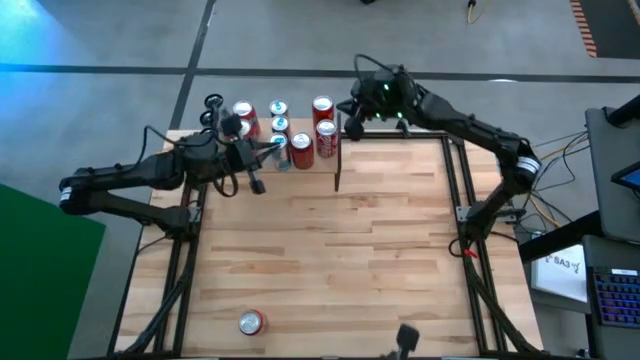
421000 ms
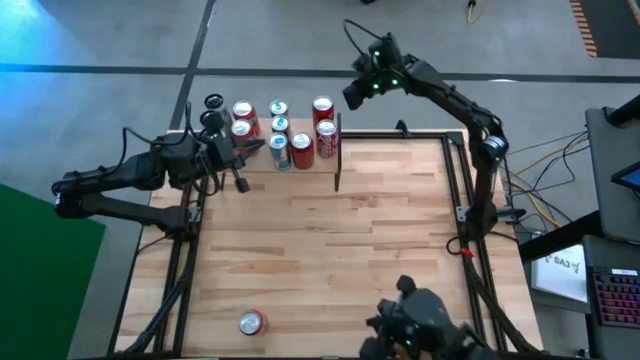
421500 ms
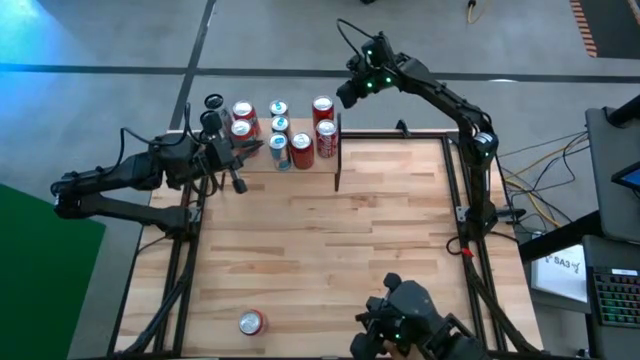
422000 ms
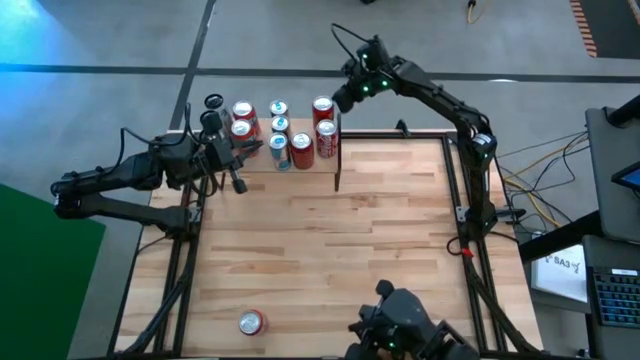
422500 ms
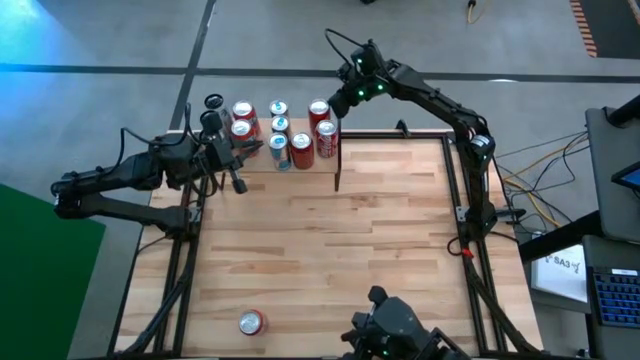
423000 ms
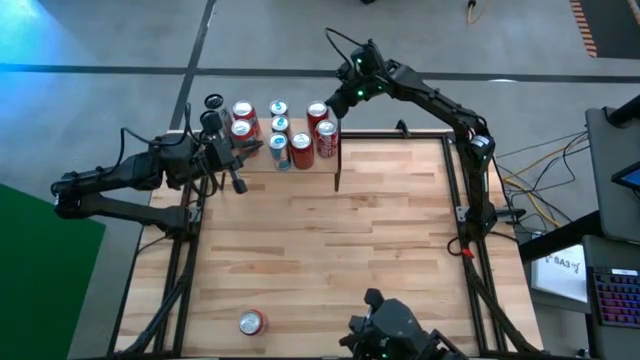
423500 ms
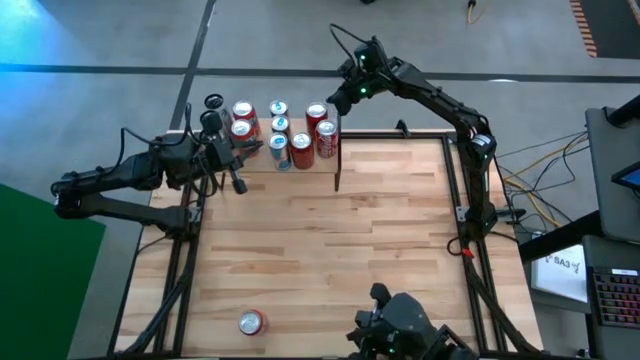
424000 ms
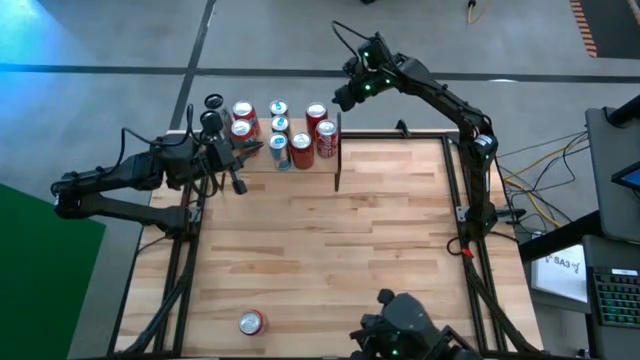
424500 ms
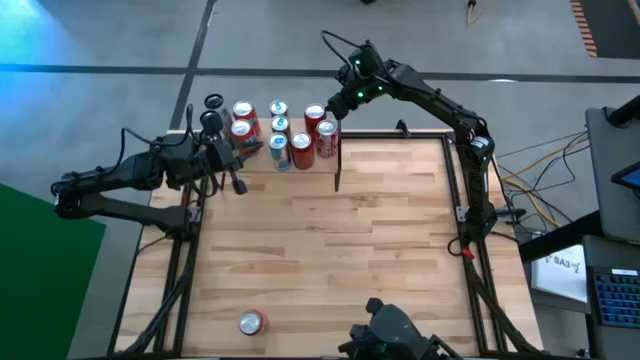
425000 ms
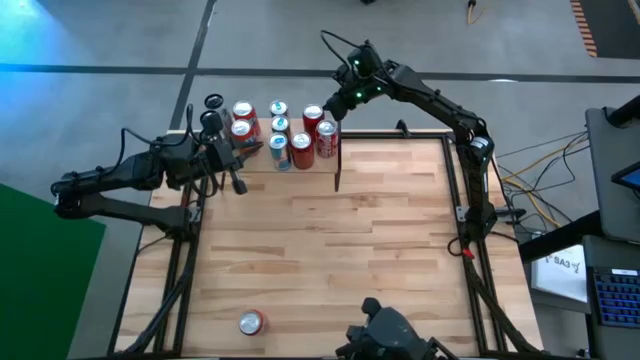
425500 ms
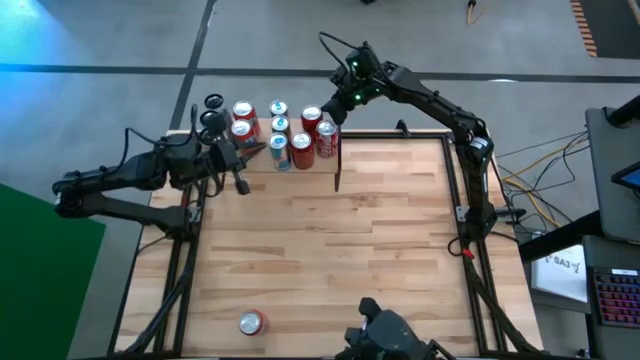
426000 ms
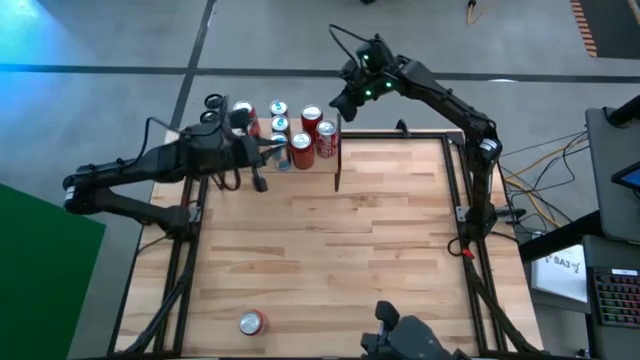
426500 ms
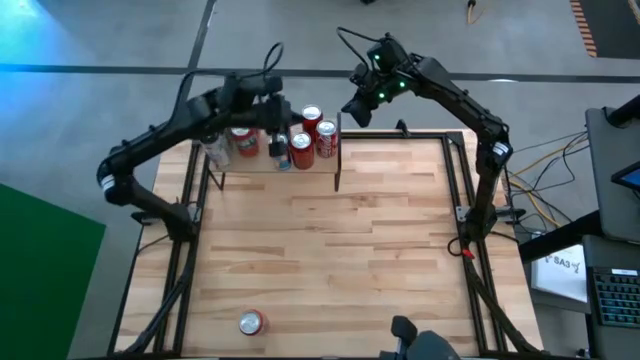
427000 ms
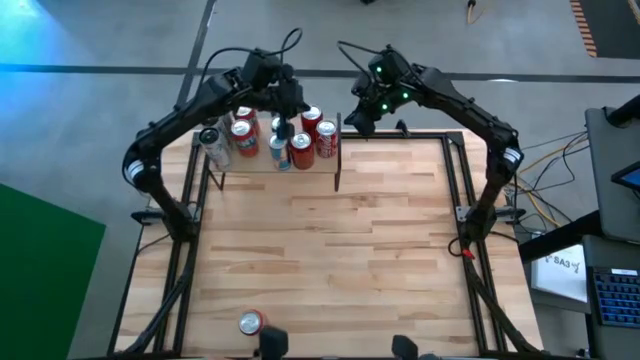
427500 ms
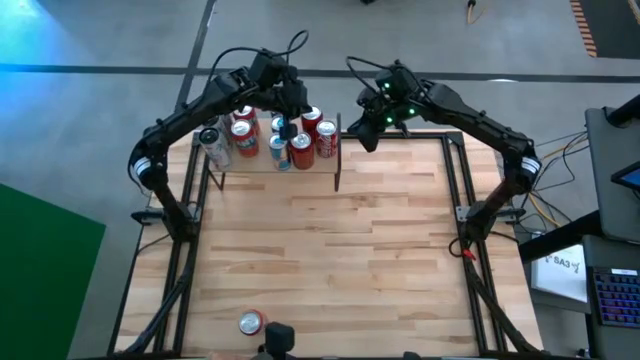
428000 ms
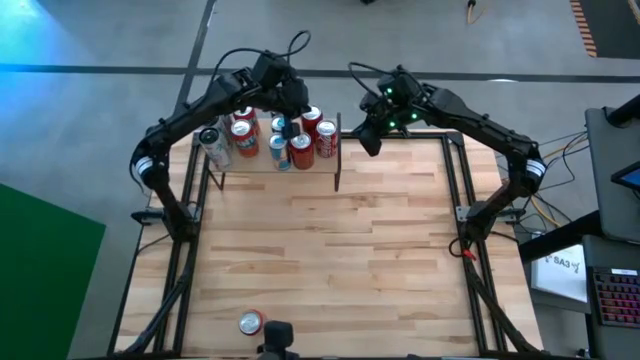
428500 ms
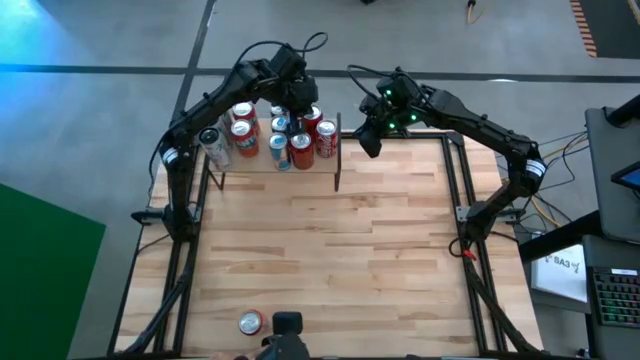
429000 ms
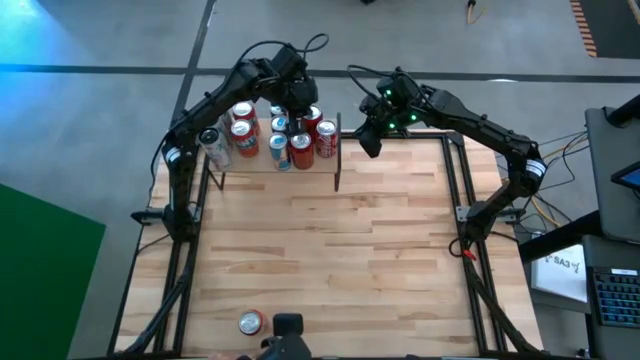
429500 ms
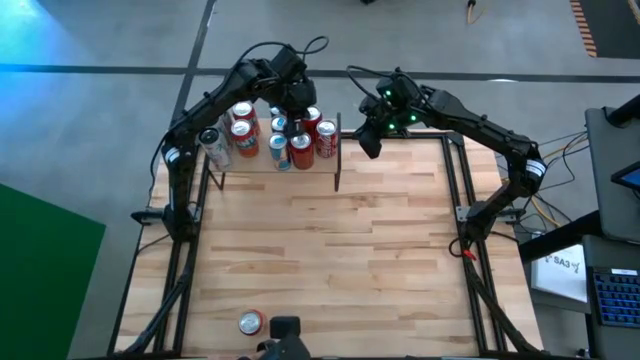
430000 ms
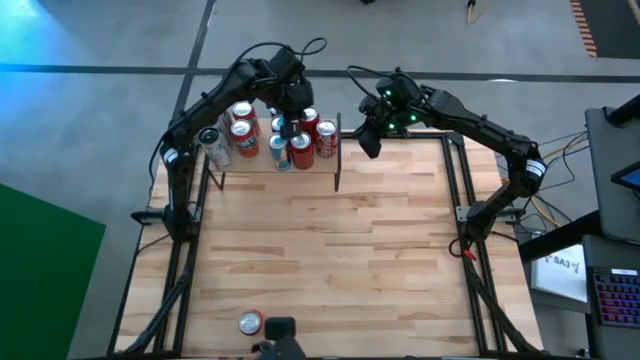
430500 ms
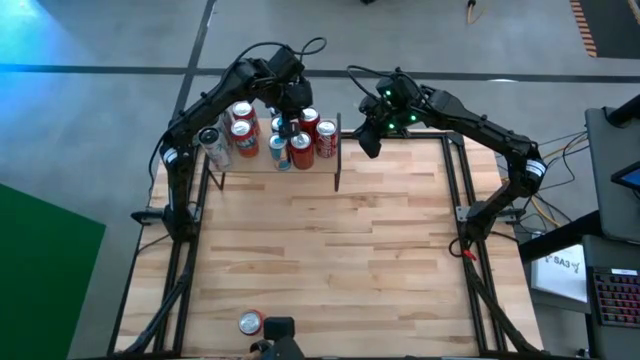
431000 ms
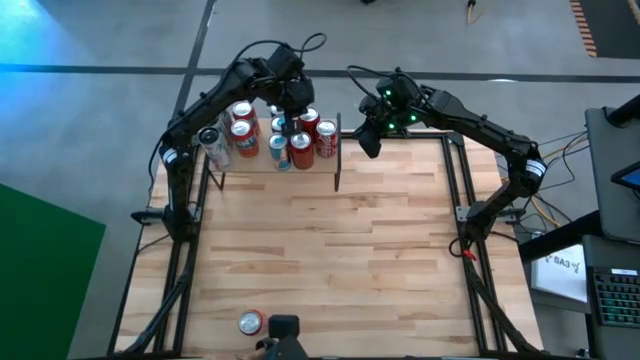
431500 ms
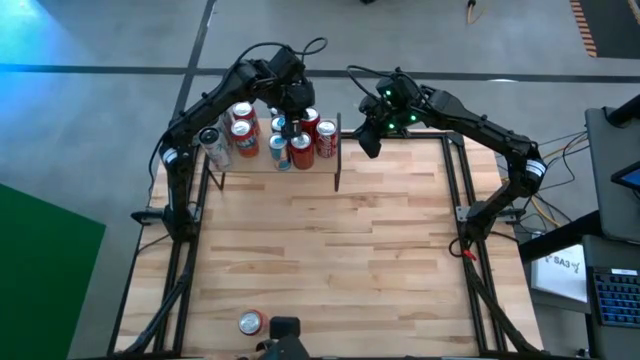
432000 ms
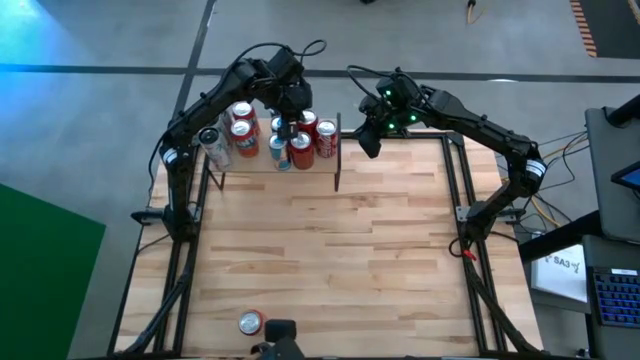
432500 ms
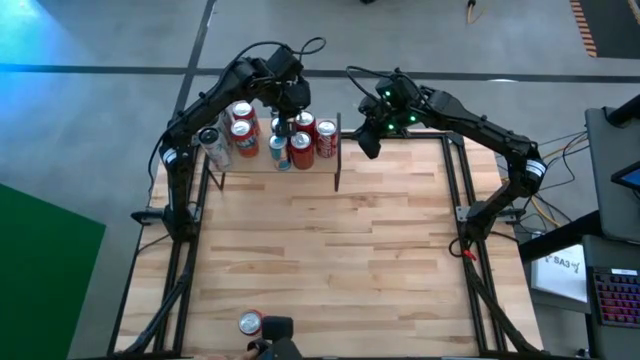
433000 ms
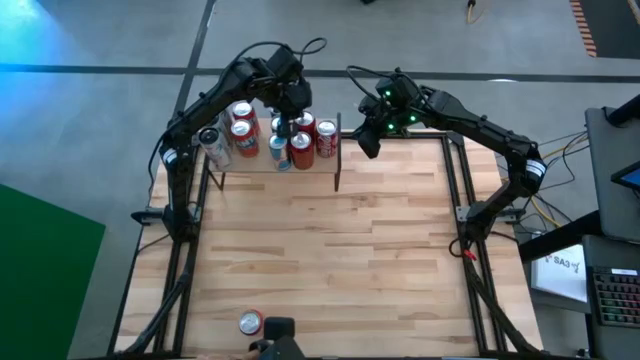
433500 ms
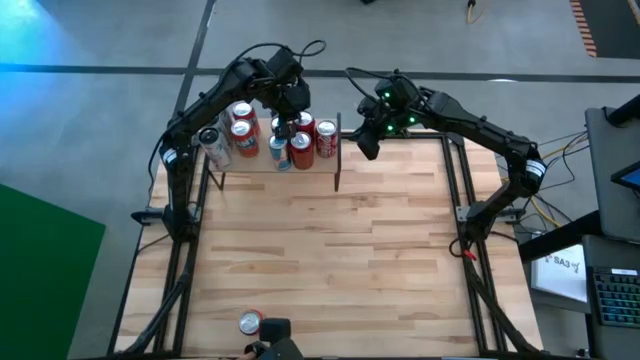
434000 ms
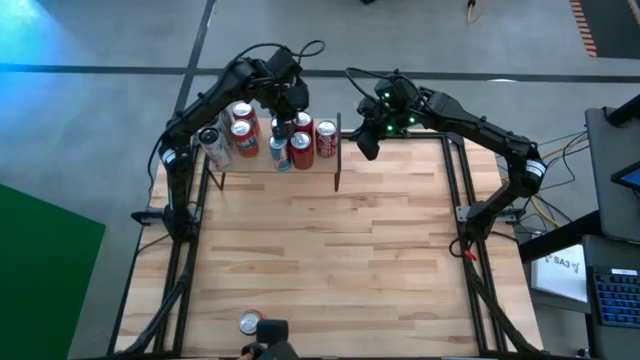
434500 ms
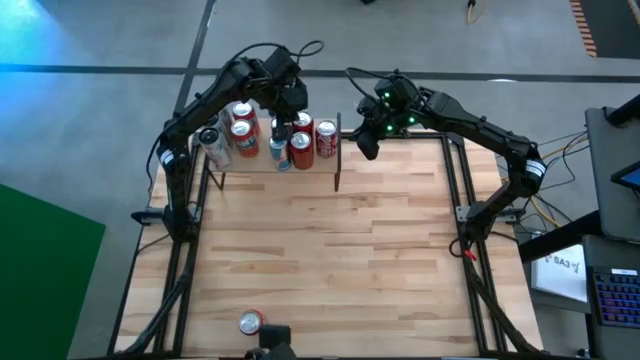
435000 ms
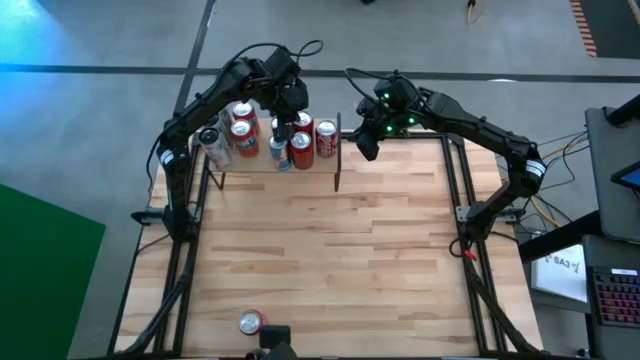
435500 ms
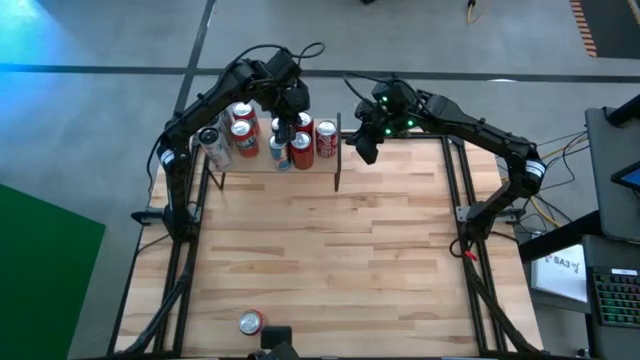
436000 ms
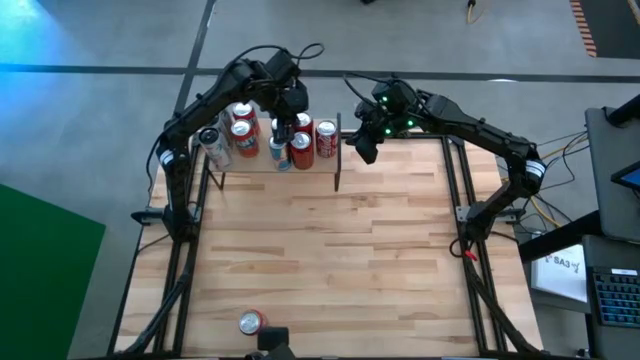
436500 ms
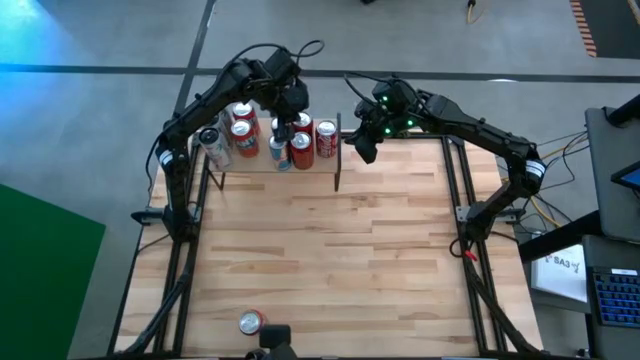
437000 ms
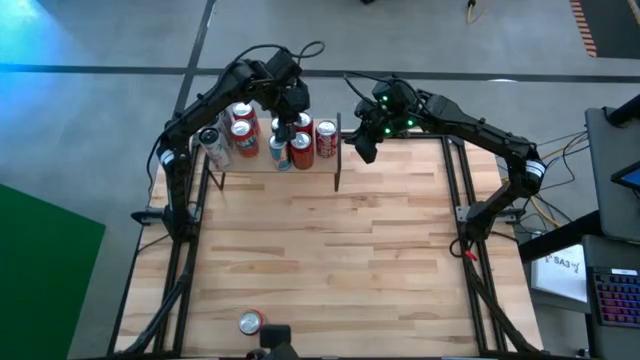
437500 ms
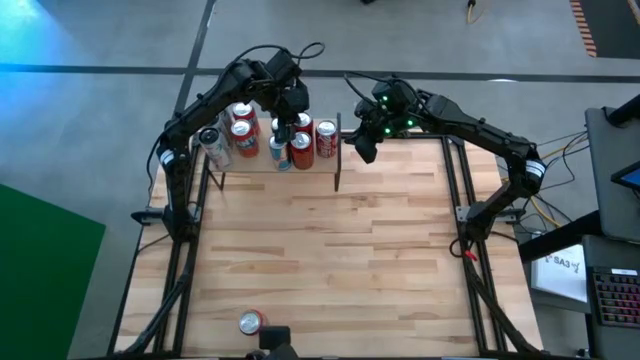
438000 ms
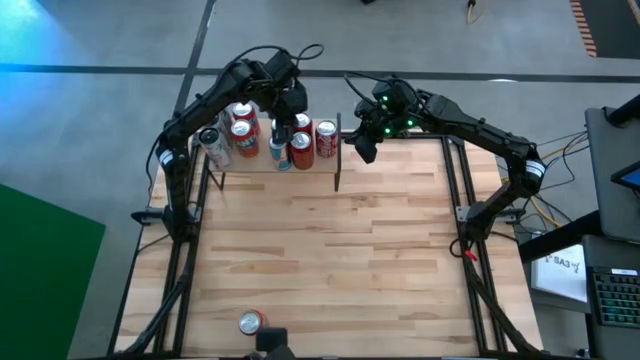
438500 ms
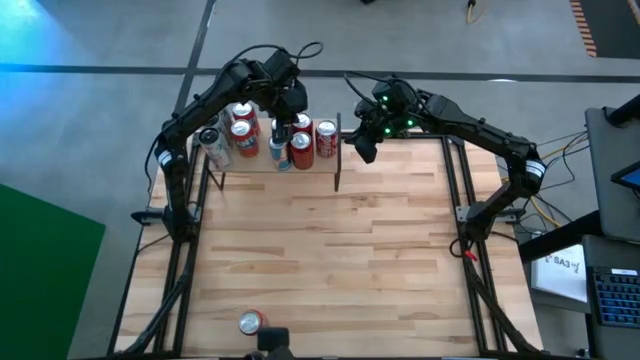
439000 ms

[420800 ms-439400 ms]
Task: Place canned beverage on shelf
Adjust the red black soda can on the shelf

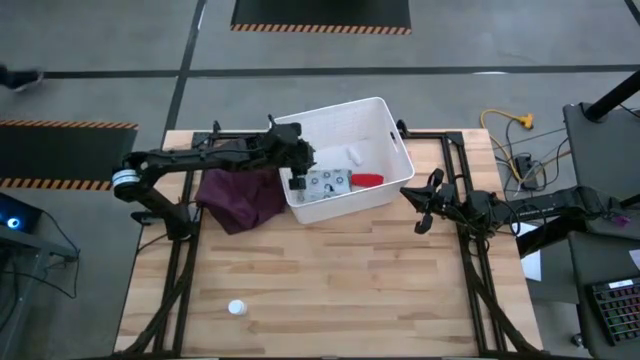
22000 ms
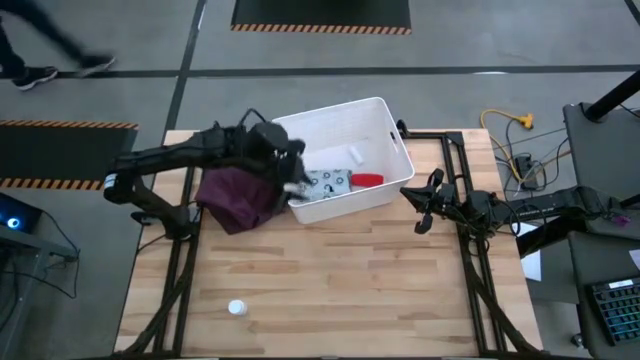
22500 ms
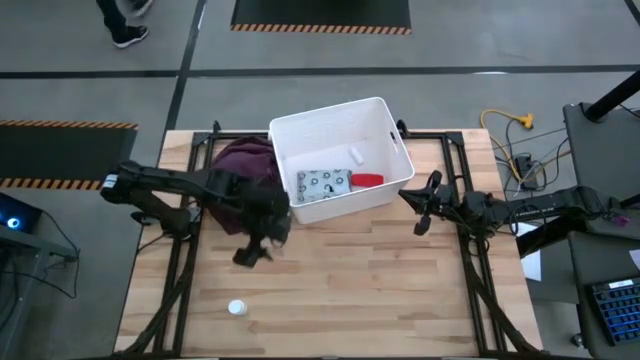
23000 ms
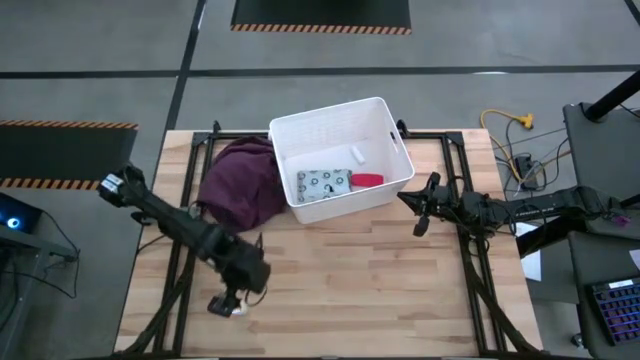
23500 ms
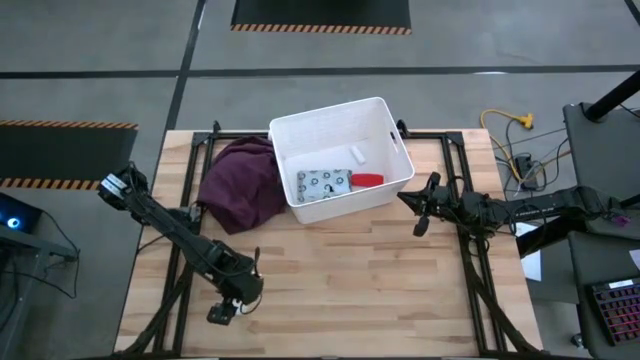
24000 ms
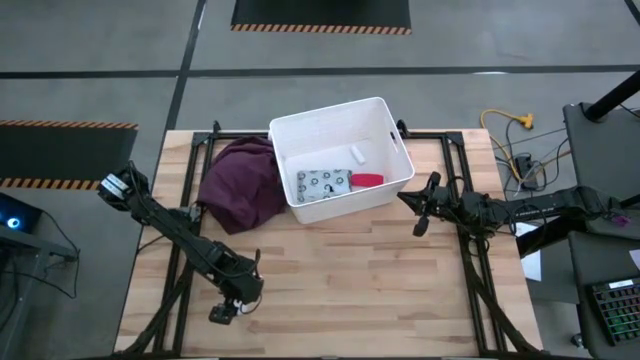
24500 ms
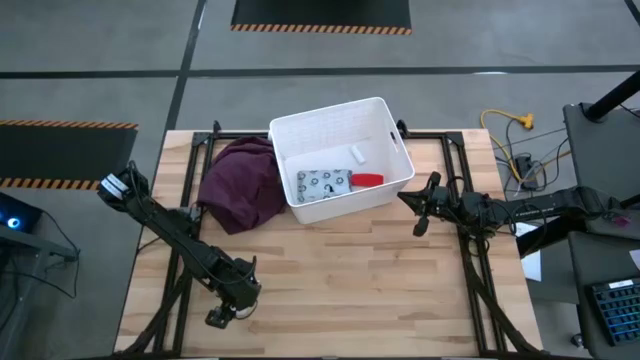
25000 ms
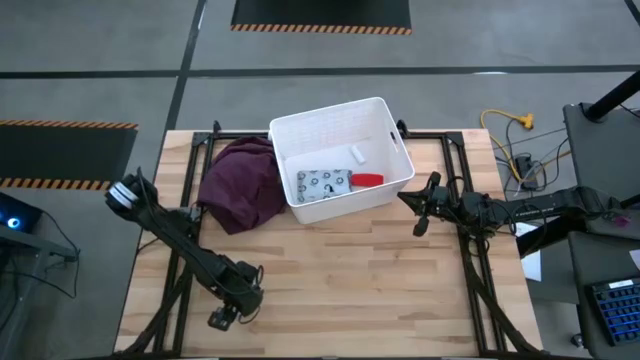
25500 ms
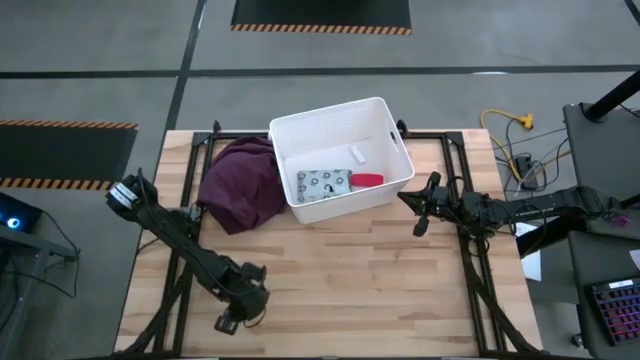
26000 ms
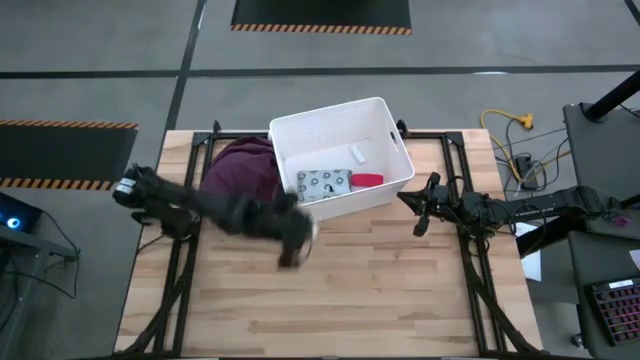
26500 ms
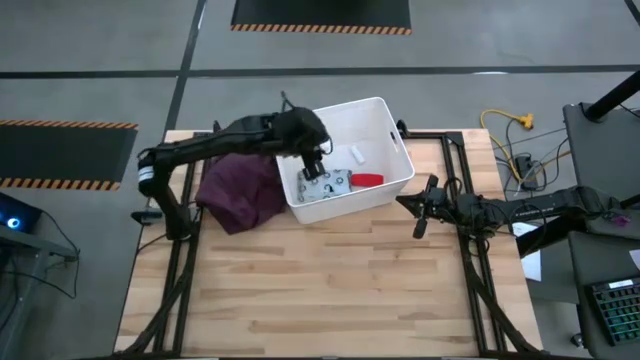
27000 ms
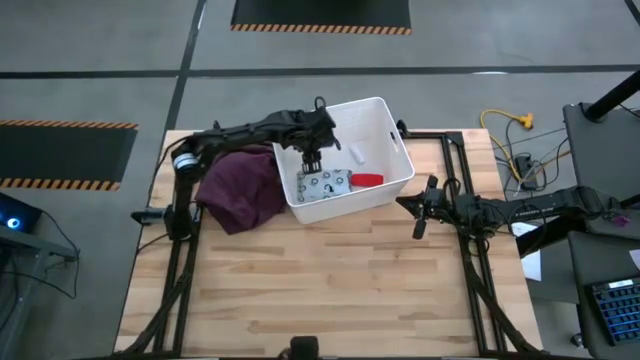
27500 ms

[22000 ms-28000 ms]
Task: Pick & place medical supplies in basket/bin
Put the white pill bottle into the white bin
